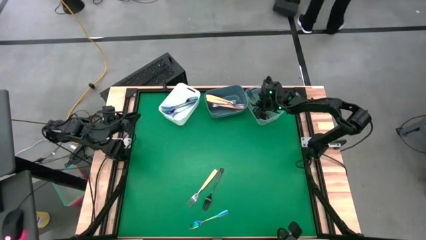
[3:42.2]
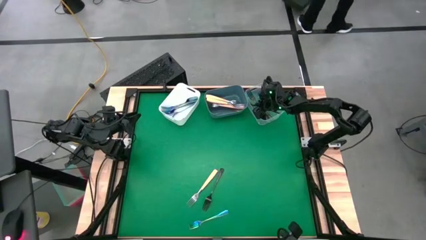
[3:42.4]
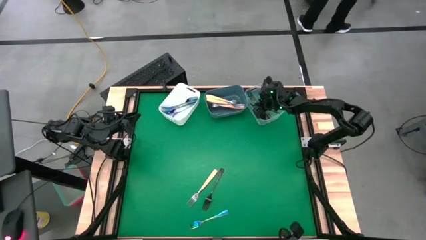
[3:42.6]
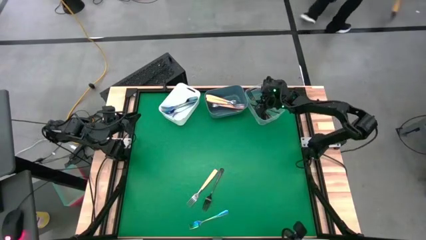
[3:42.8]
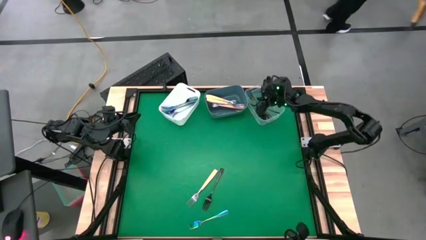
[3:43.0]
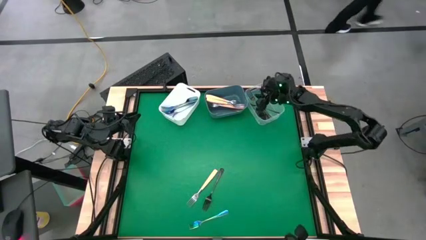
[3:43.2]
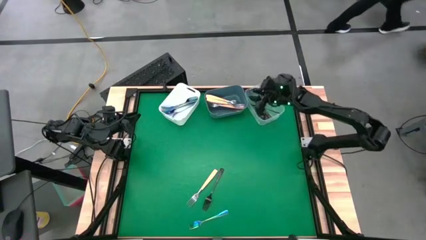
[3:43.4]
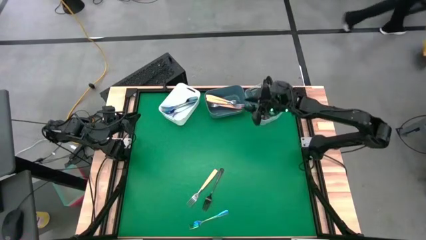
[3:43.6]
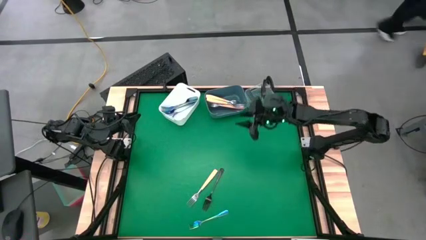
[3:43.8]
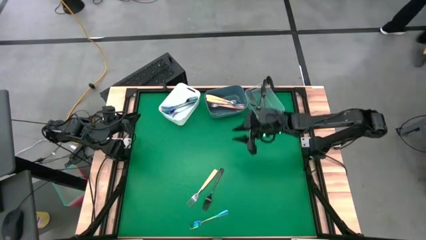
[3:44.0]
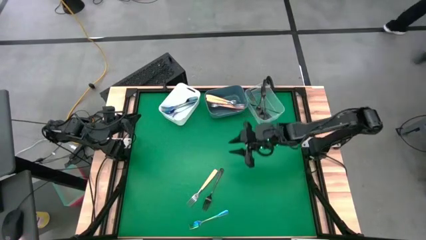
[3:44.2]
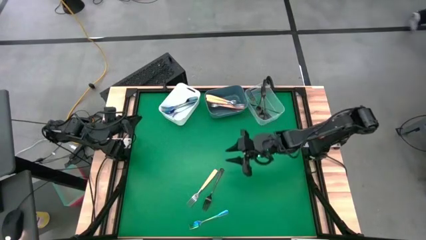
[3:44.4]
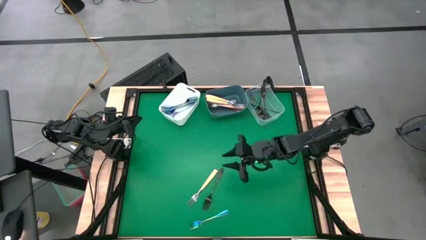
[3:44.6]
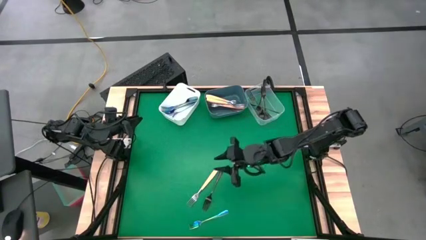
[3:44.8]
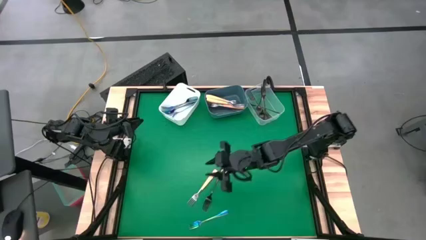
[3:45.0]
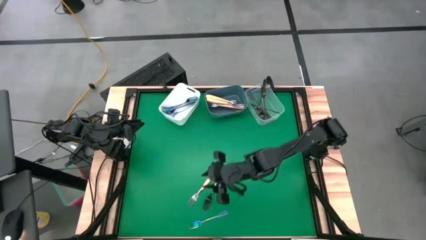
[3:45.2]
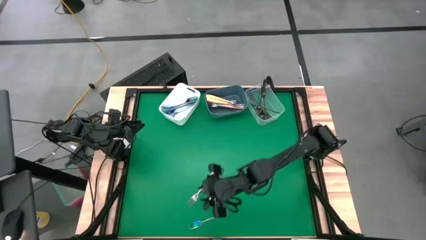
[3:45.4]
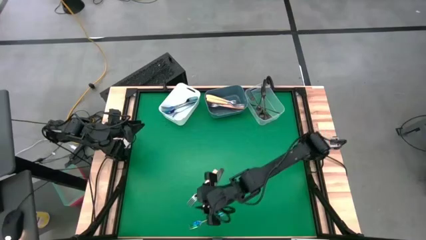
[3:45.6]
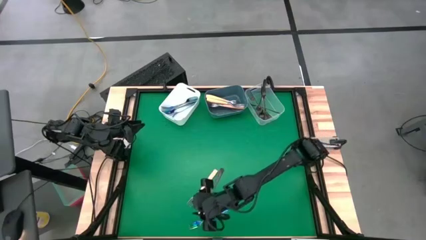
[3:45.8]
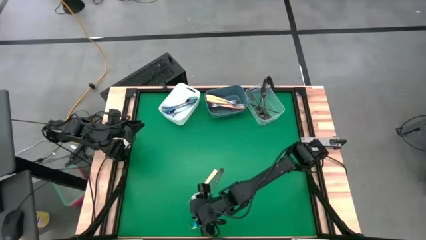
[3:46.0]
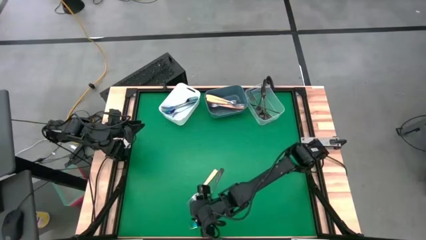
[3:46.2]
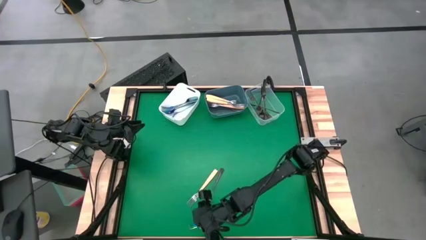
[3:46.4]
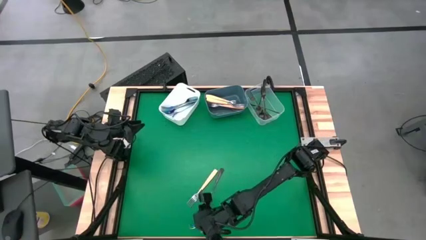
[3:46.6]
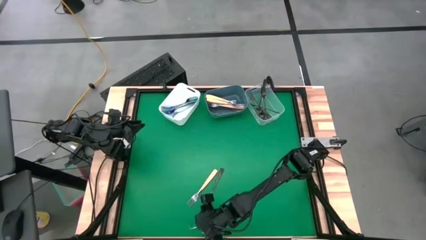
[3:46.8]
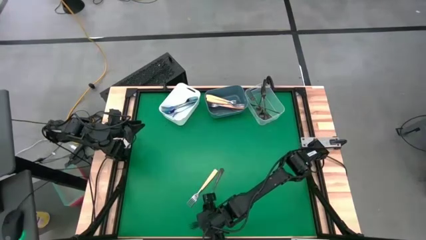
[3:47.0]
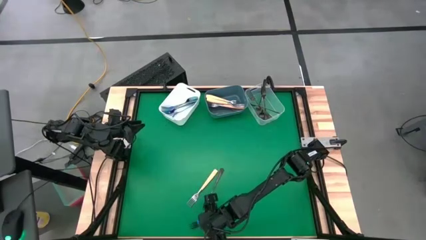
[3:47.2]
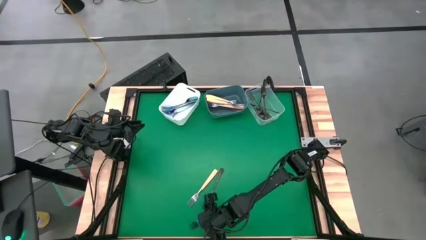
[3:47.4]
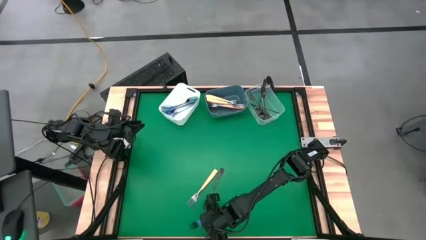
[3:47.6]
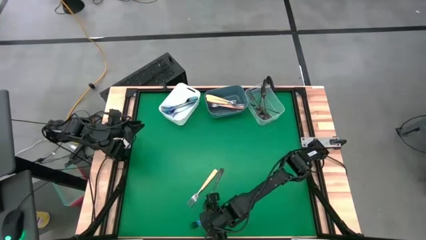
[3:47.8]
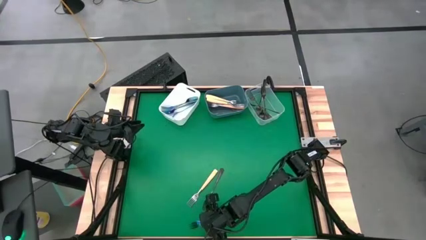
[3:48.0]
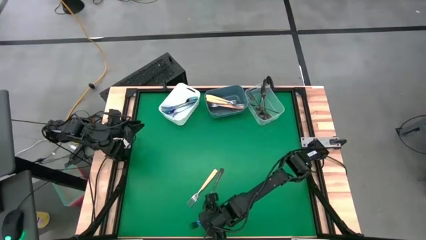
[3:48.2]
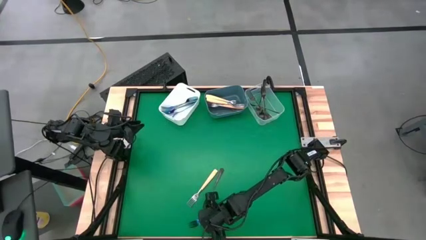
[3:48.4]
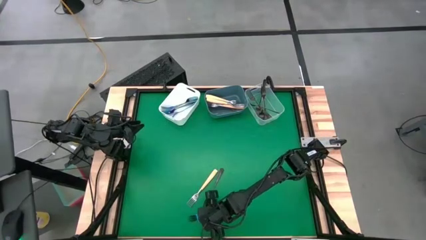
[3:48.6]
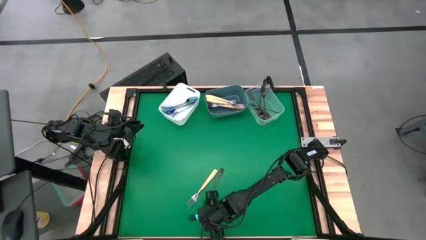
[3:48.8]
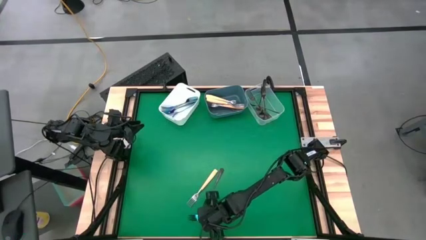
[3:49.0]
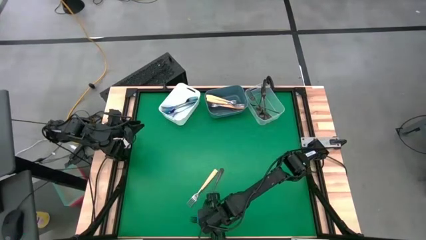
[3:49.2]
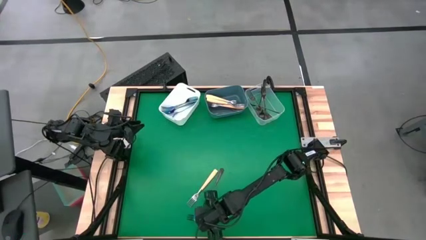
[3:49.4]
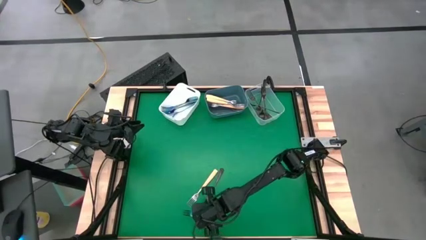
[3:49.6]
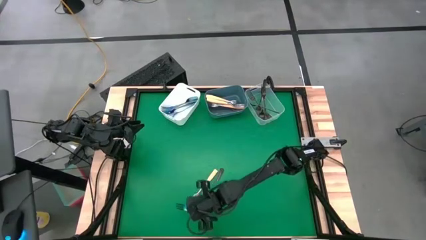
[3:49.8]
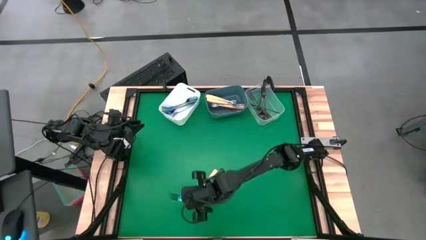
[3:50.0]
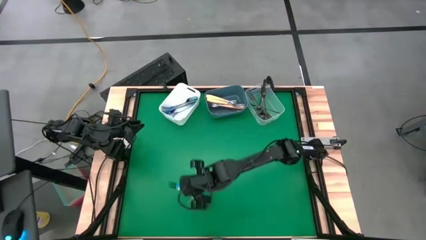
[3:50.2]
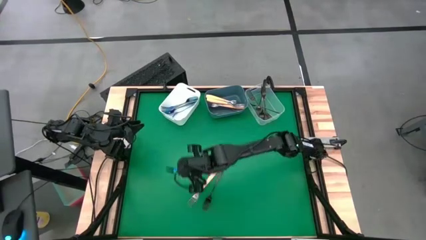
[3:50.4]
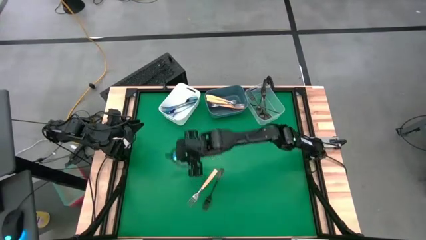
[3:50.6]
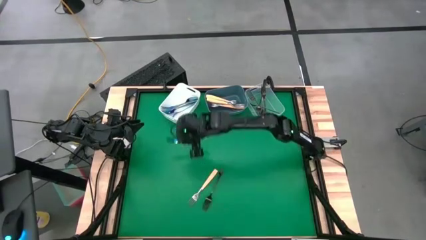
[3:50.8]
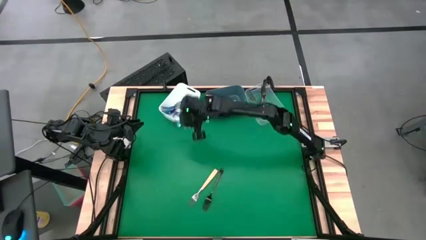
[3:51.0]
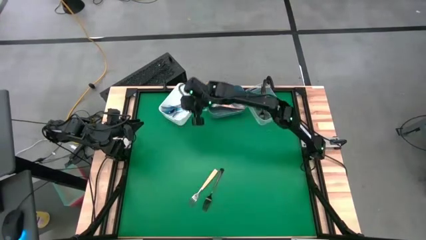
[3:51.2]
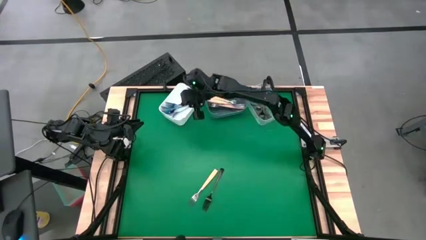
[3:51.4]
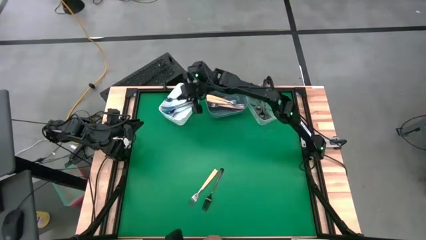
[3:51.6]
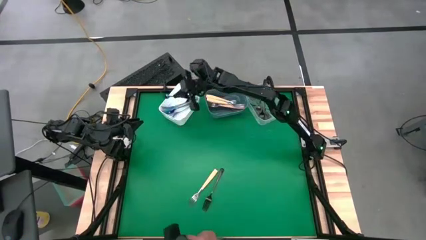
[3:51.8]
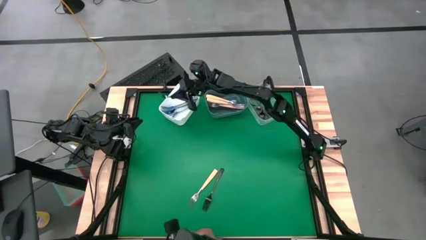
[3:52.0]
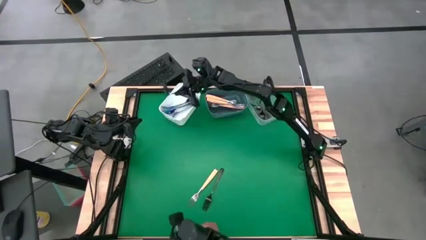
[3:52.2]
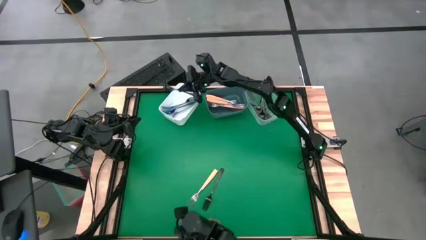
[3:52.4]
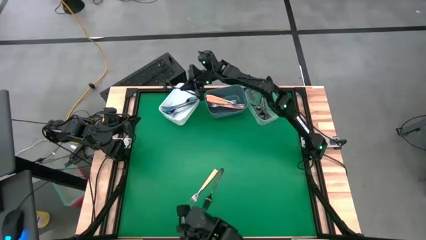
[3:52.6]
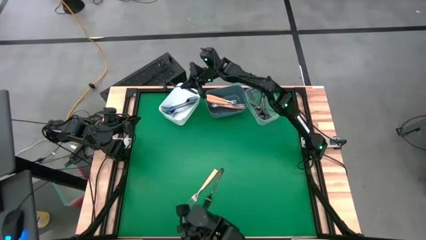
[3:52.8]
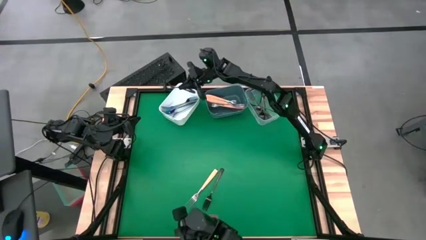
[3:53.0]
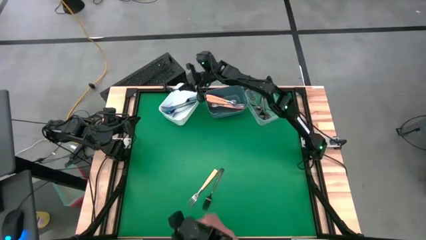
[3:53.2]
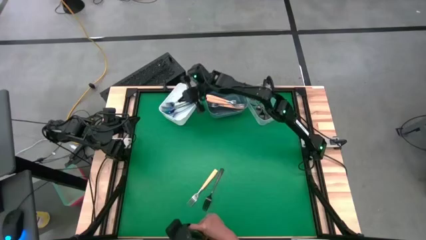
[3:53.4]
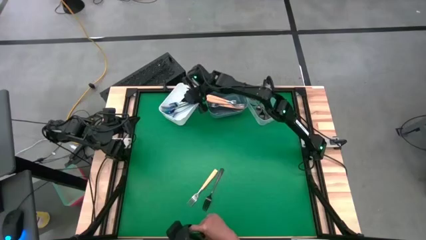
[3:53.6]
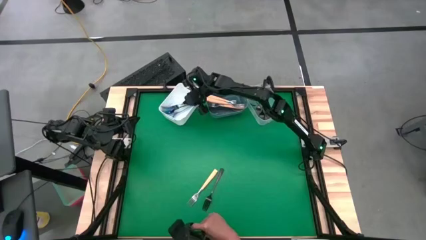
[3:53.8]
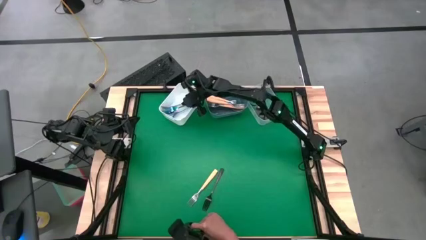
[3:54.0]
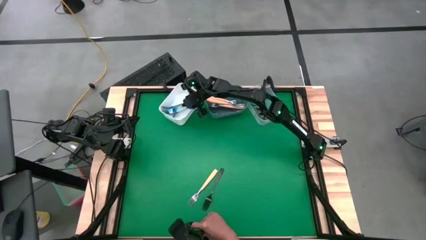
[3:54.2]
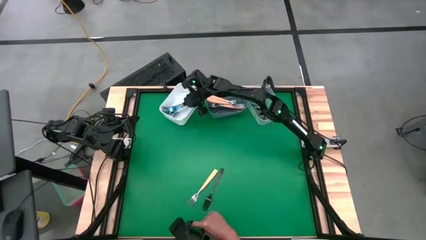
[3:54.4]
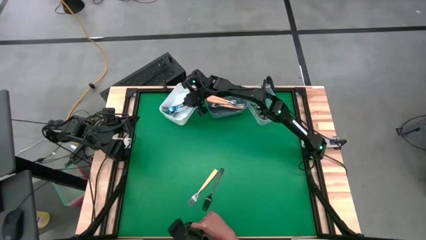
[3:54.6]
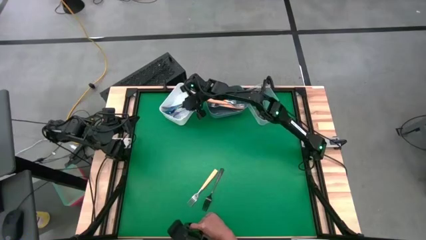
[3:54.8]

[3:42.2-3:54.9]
Task: Sort silverware by color (type)
Put the blue fork into the white bin

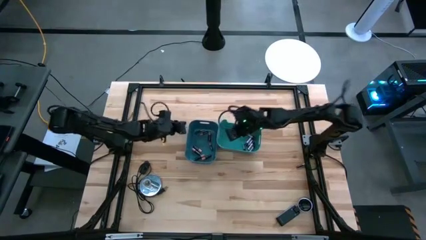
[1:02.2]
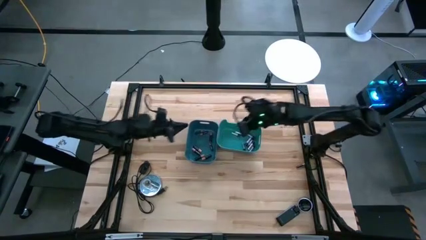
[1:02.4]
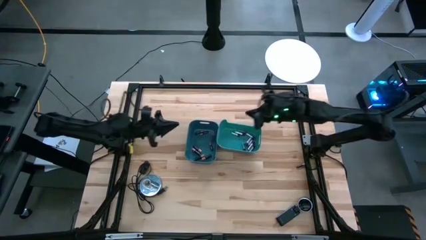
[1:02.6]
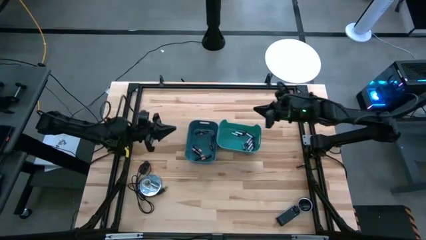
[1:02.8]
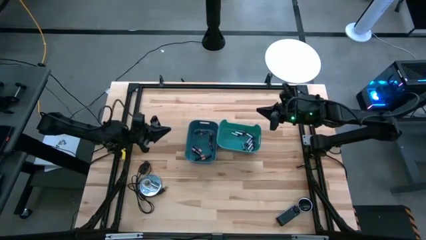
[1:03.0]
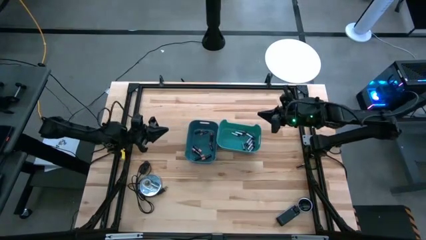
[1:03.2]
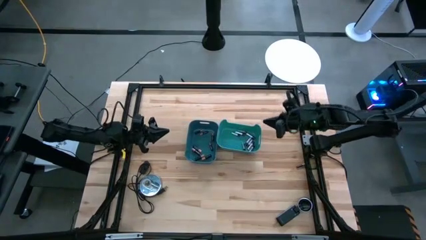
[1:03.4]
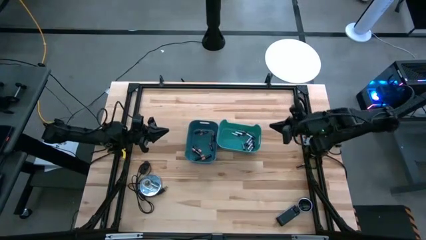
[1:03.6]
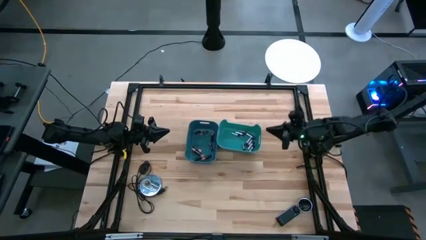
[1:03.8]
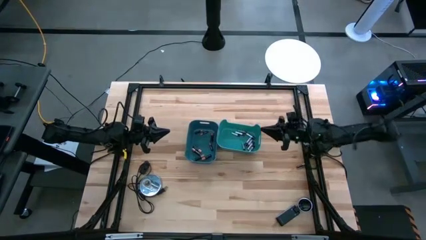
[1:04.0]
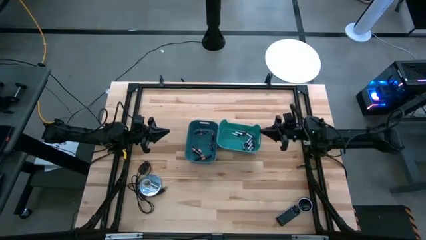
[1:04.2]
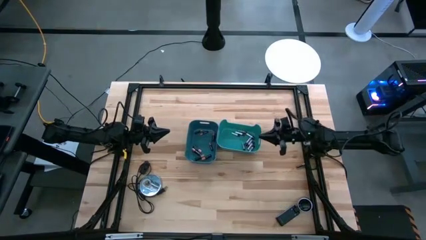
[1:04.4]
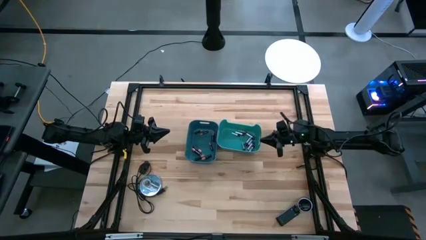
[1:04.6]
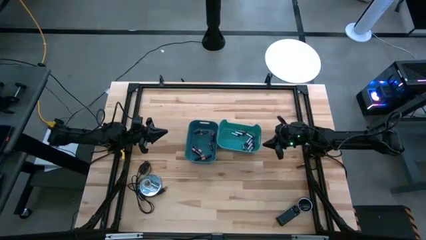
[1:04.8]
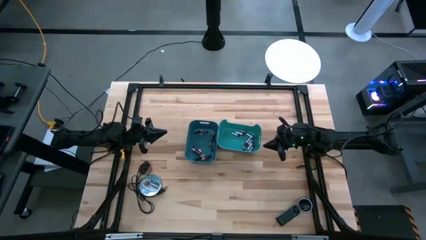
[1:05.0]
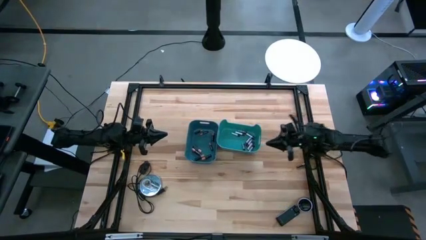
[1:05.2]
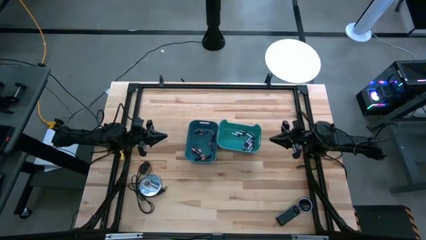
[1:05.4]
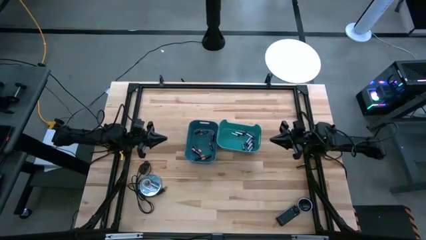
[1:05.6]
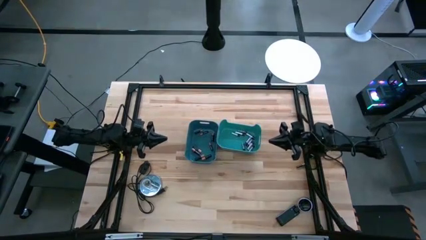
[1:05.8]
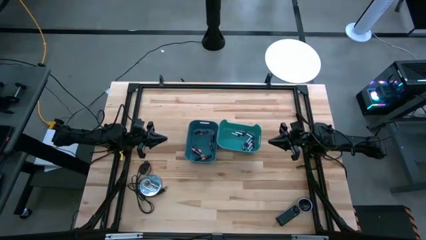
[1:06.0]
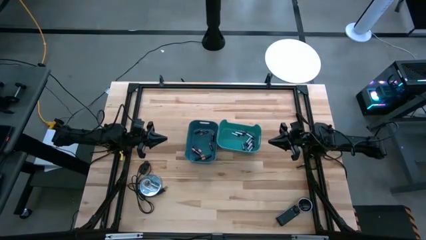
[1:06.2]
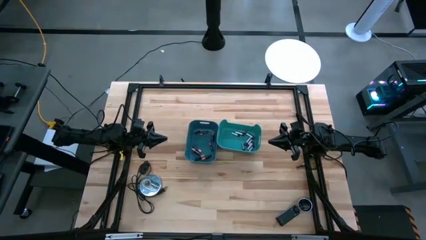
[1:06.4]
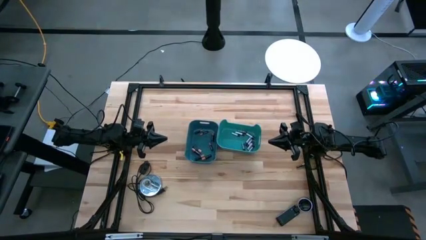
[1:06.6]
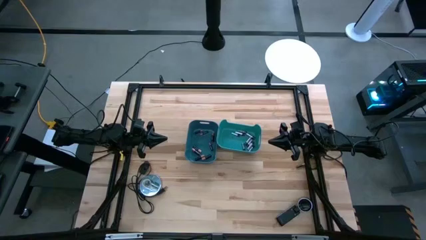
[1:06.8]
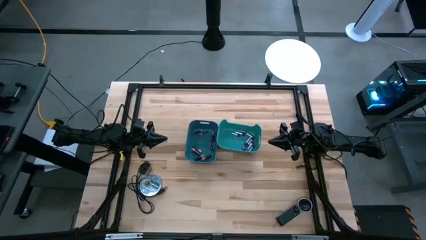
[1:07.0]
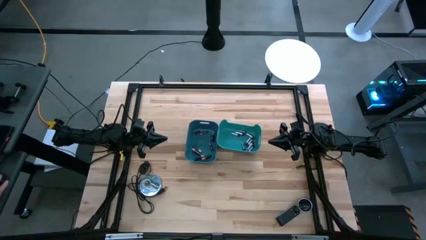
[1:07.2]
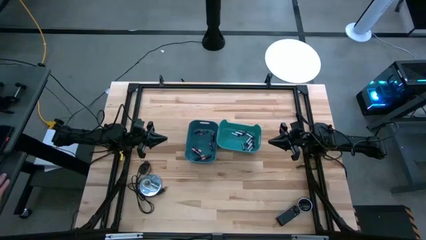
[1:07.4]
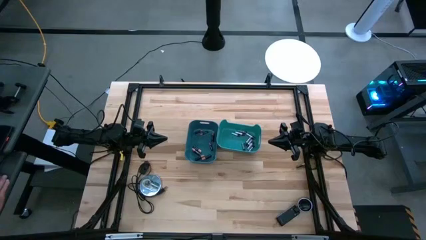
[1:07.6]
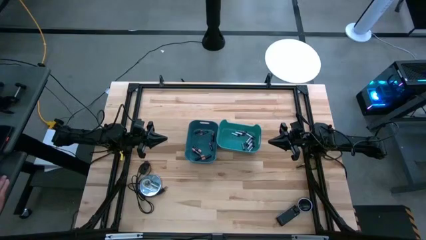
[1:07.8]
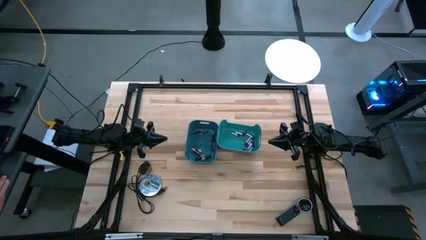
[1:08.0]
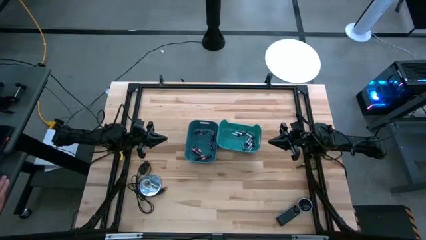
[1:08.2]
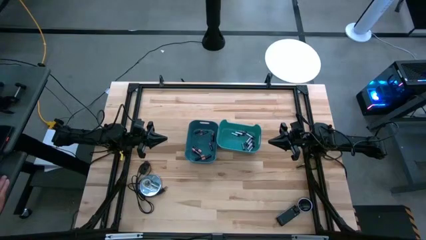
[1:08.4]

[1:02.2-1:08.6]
Task: Sort batteries
Return to Home Position
